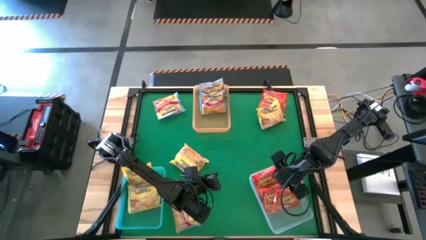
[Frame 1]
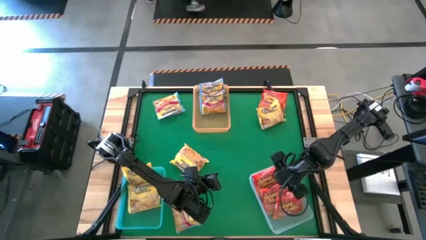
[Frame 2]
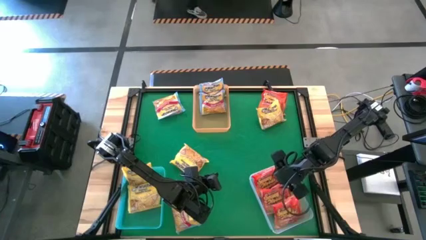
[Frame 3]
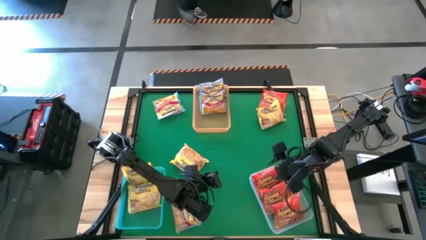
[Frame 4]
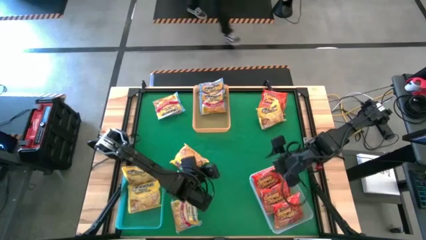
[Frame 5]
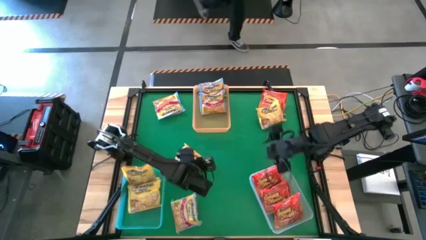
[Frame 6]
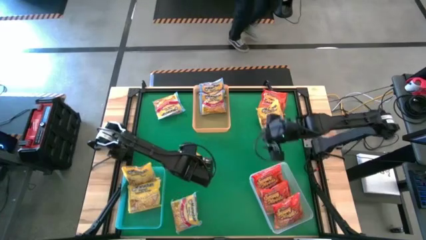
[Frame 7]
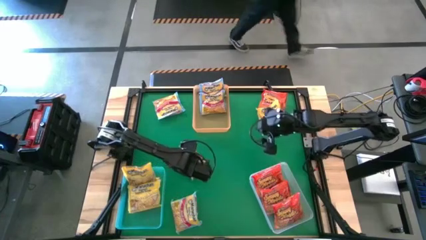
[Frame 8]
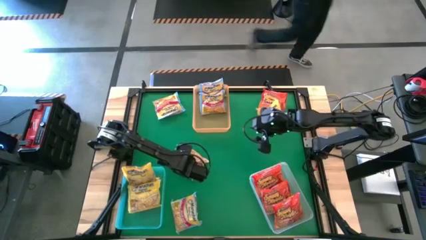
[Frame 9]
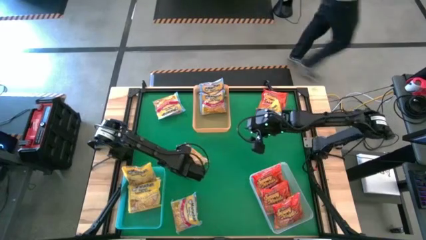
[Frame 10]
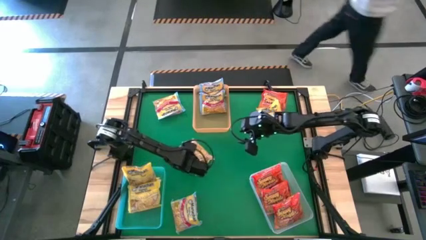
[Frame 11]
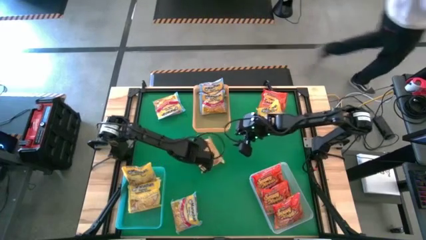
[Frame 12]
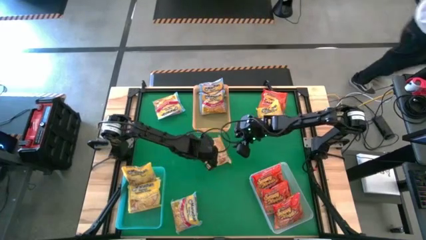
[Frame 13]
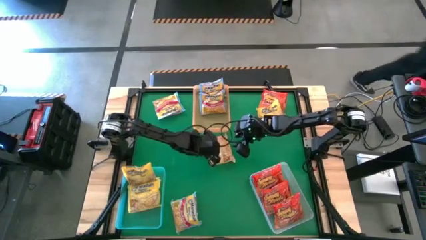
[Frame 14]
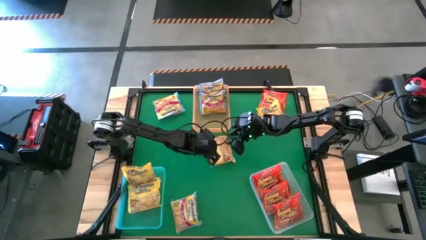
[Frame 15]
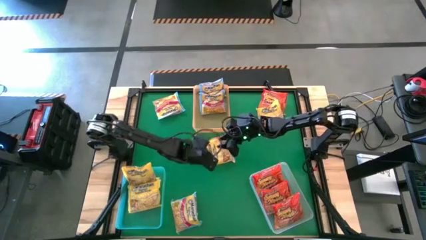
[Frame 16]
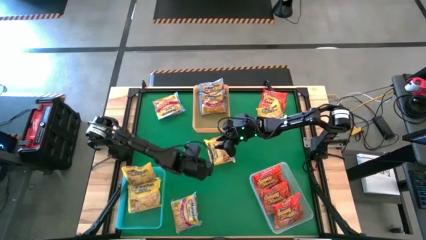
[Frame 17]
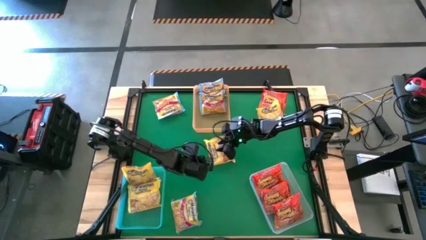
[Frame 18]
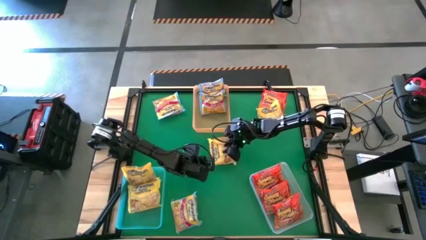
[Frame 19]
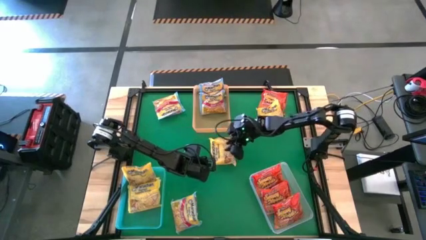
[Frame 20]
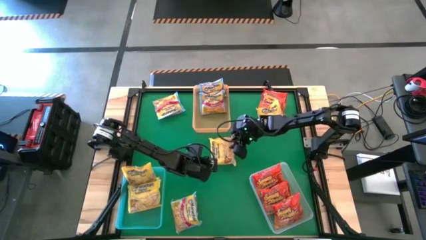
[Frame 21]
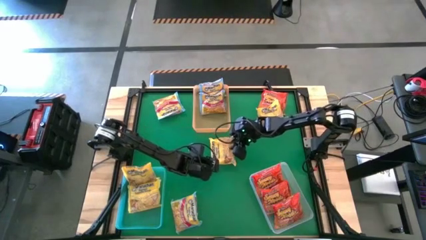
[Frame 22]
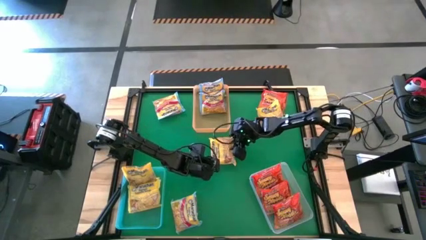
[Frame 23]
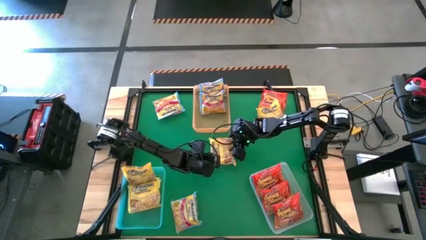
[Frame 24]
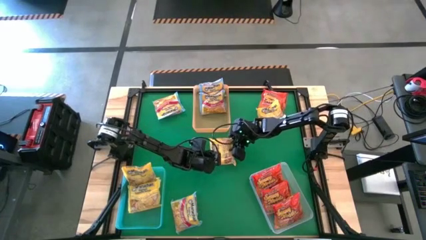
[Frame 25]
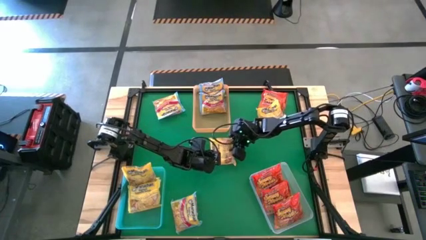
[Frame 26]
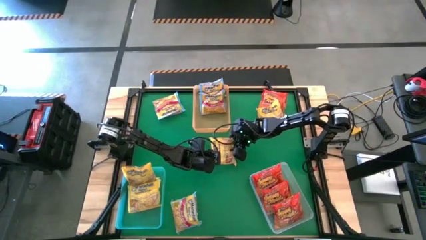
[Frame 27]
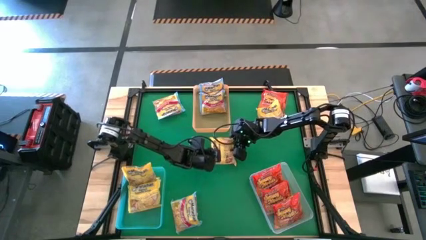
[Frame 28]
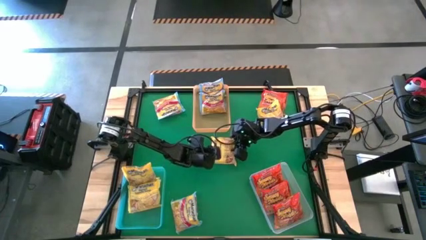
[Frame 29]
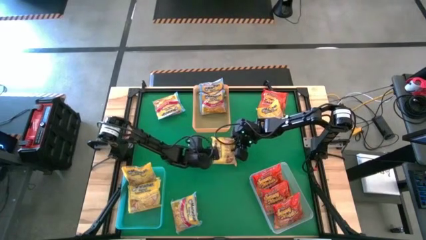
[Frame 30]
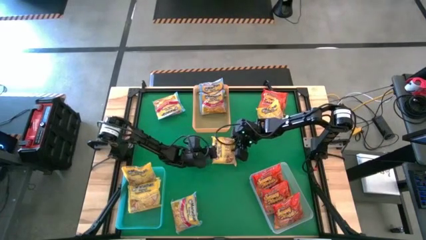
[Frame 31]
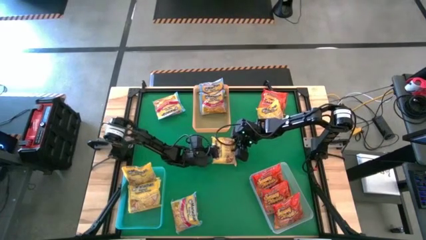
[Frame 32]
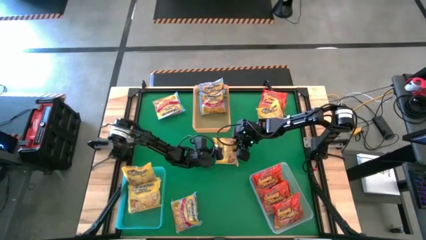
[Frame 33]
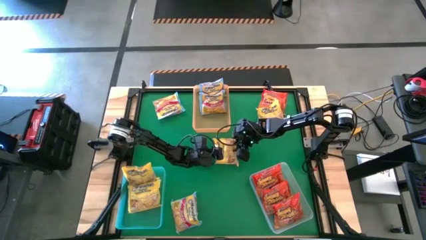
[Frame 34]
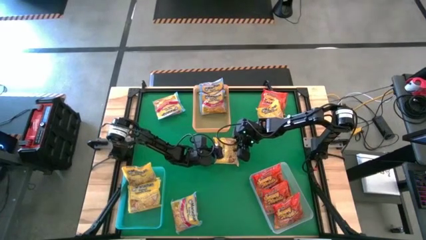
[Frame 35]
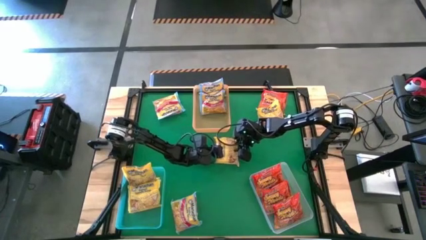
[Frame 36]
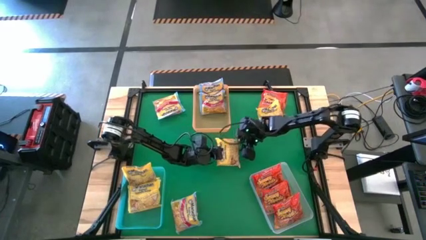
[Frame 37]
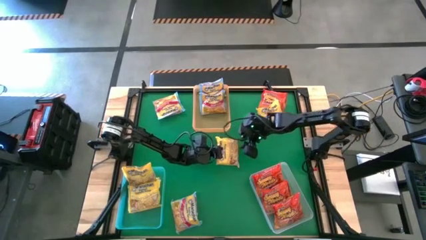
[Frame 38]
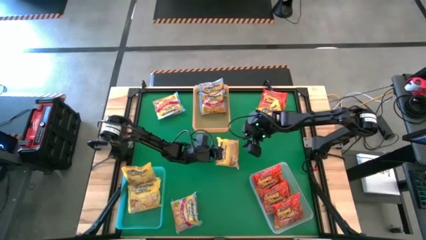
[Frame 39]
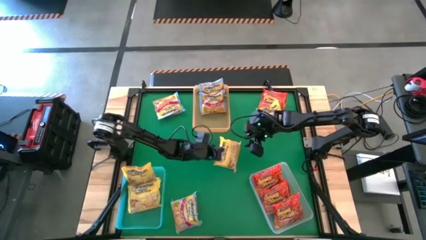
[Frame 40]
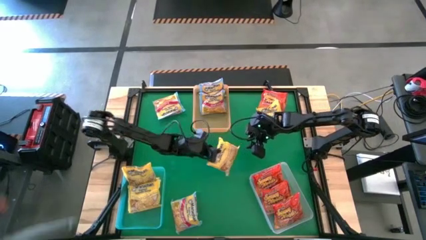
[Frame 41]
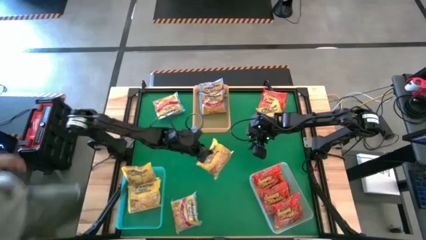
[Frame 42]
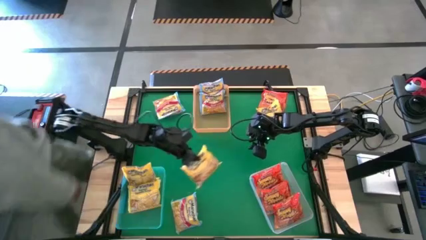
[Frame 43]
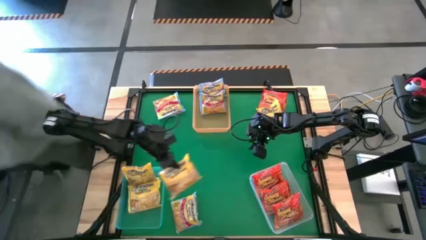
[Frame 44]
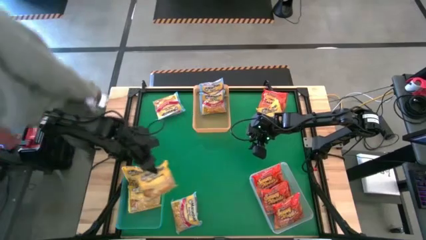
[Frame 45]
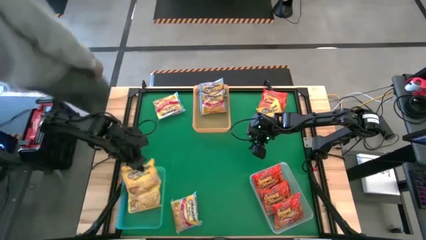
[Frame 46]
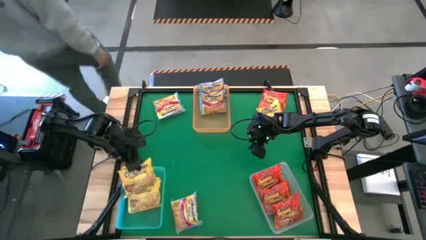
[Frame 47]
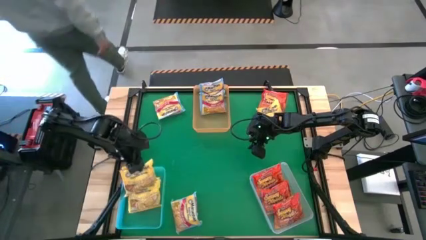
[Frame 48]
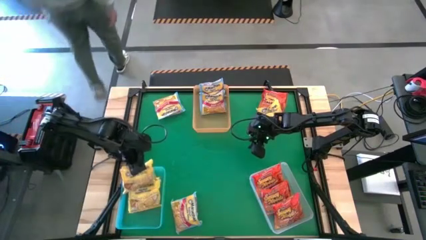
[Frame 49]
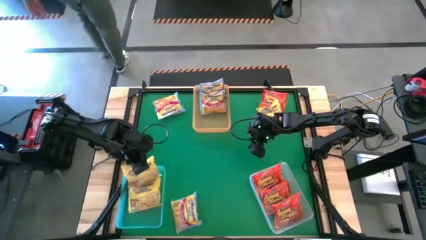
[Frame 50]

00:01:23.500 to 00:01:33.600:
Task: Sort Maruchan noodles
Put the yellow noodle pack into the blue bin

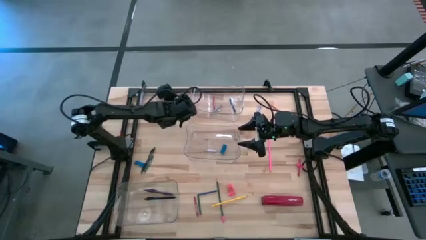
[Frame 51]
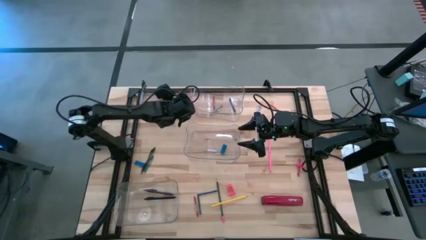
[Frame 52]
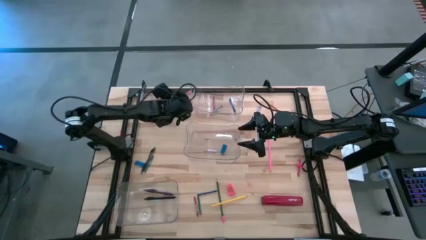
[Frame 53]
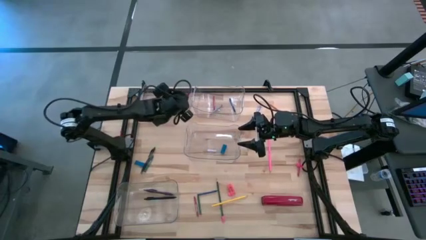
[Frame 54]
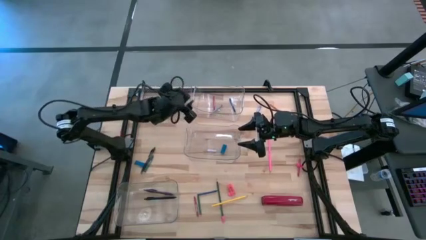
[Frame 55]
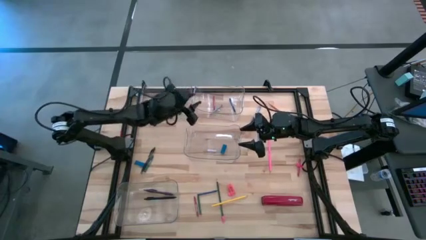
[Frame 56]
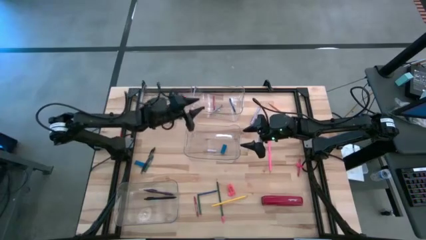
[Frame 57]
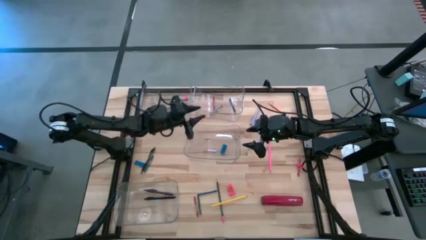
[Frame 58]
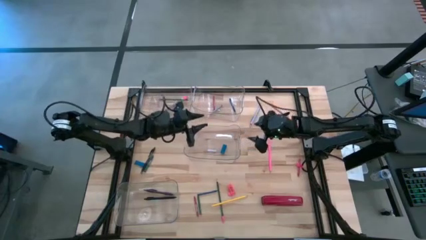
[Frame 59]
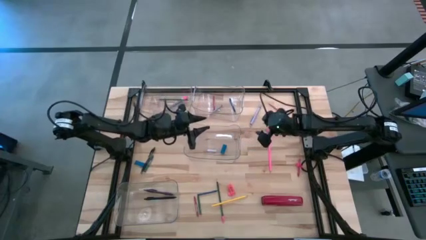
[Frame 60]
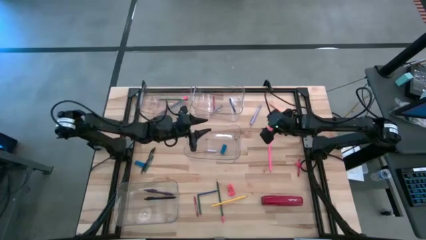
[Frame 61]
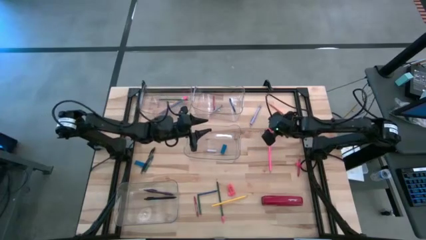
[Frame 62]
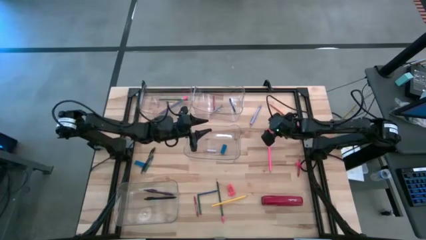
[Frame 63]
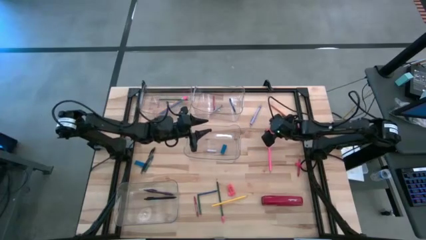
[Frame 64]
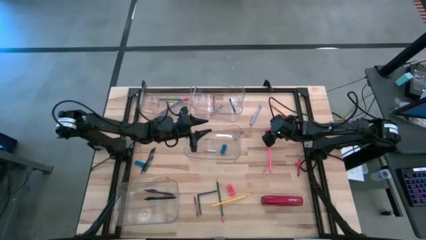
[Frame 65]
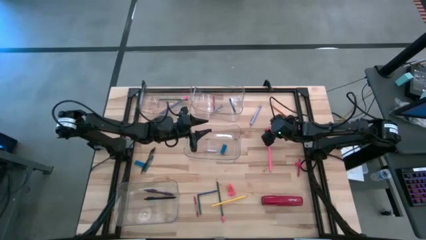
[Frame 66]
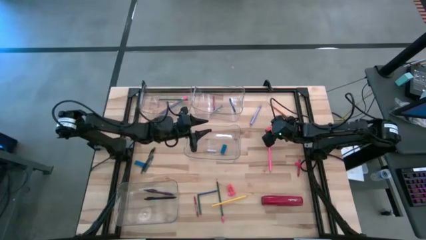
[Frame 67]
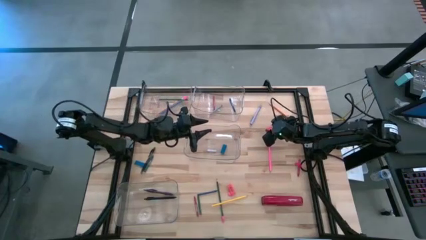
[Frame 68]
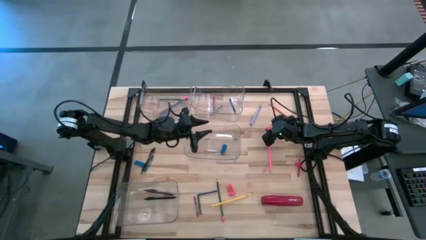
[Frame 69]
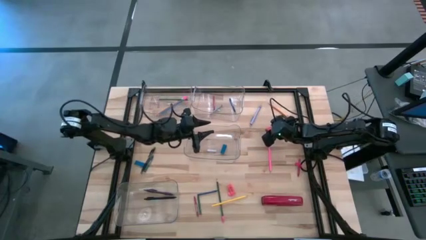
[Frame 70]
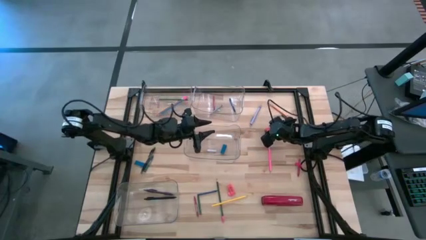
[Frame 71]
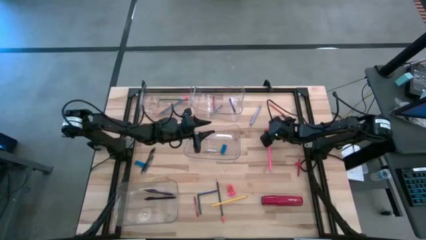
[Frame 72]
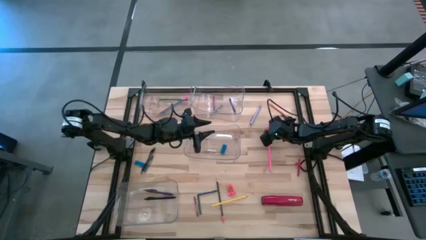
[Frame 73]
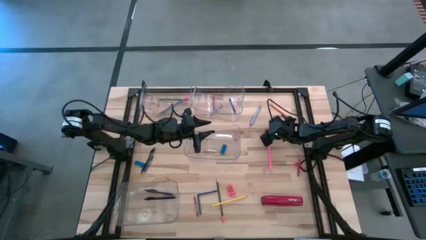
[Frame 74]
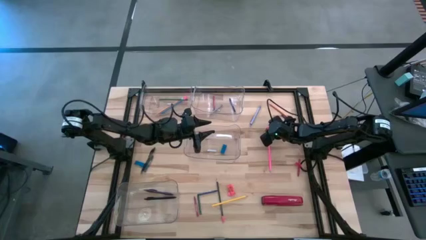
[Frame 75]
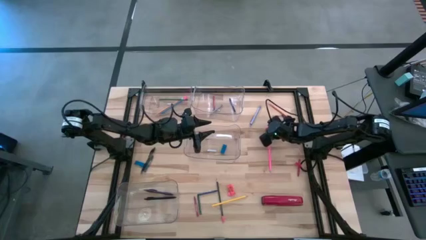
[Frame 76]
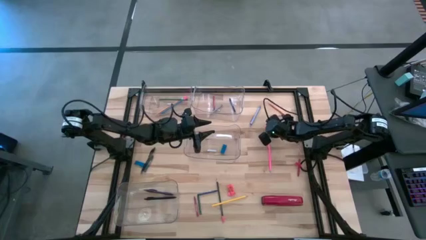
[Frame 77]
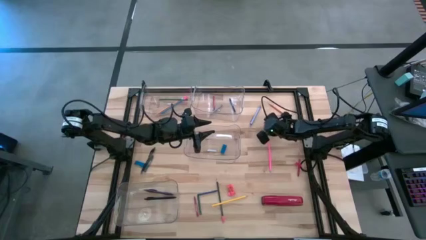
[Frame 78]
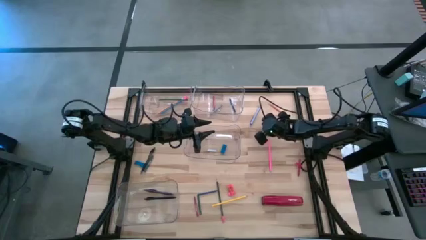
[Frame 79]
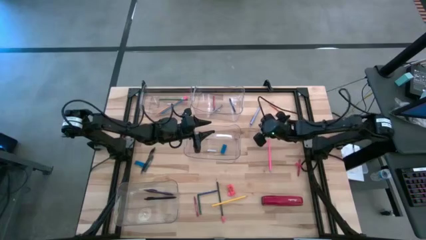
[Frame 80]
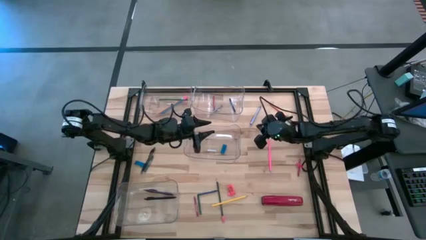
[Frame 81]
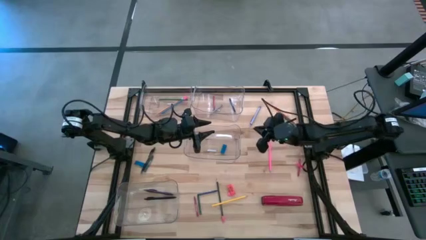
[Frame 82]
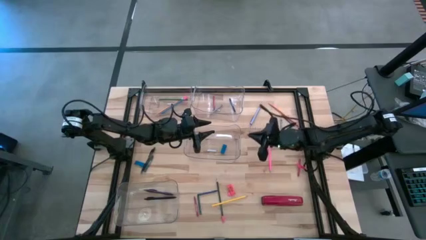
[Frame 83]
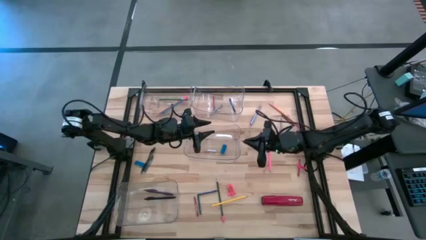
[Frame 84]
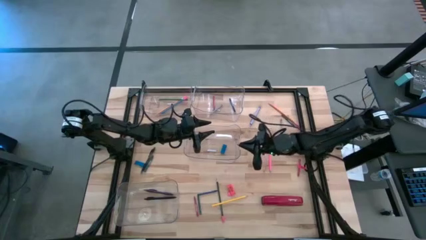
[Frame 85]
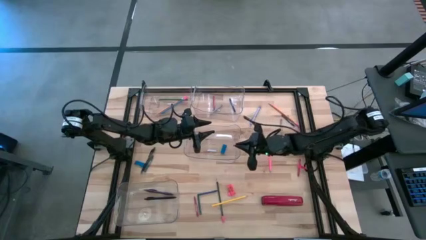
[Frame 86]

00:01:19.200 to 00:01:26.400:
Task: Sort crayons/erasers/pens/pencils in bins
Put the top orange eraser into the middle transparent bin
